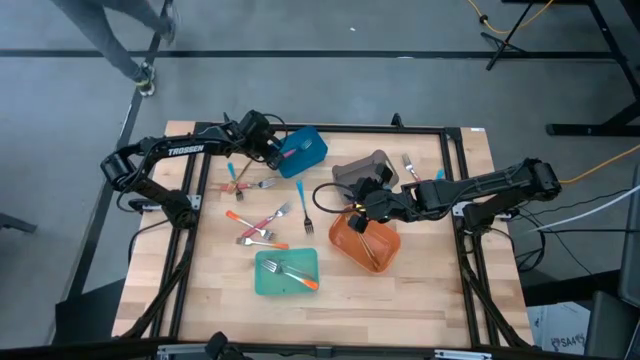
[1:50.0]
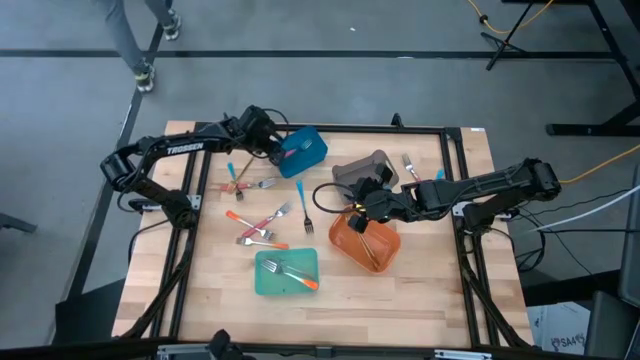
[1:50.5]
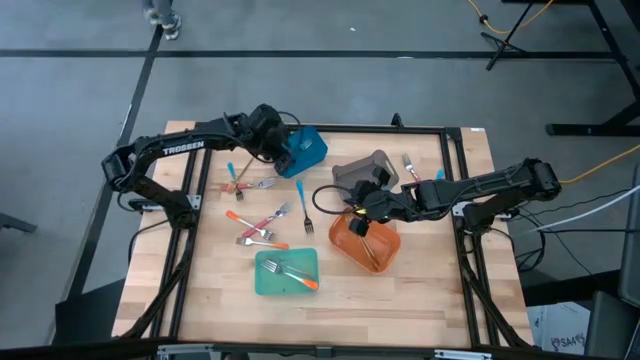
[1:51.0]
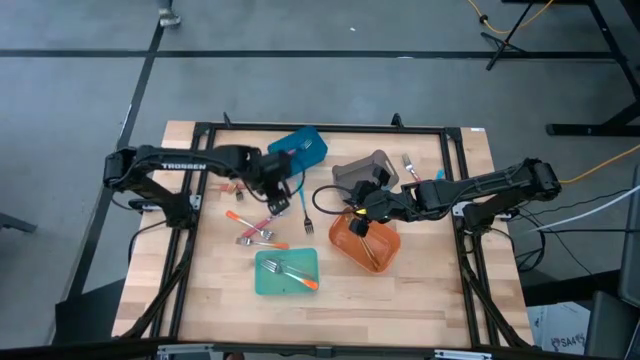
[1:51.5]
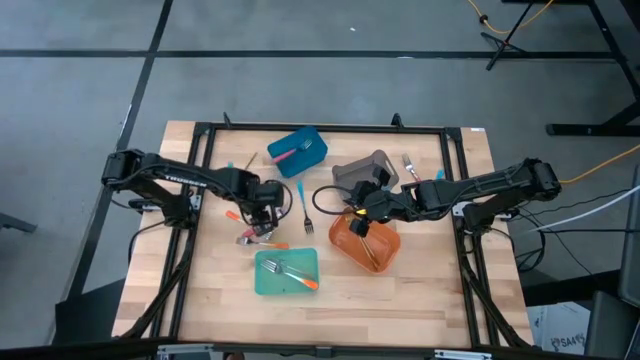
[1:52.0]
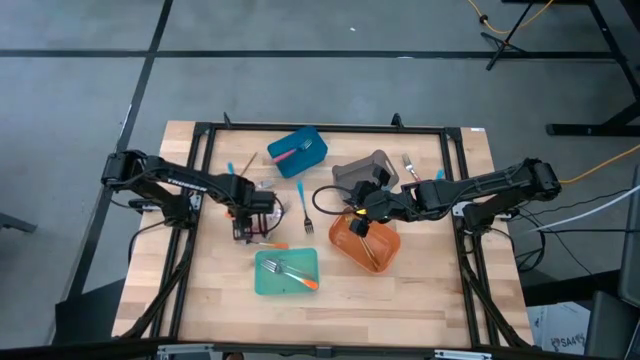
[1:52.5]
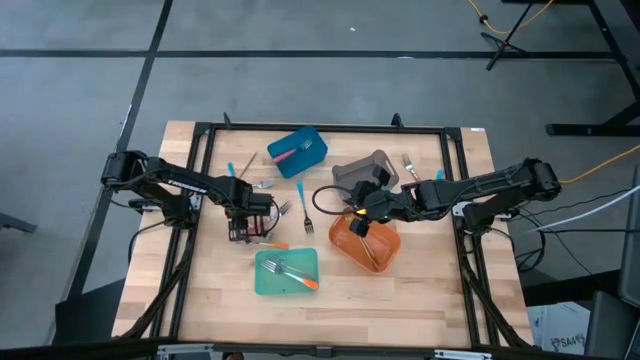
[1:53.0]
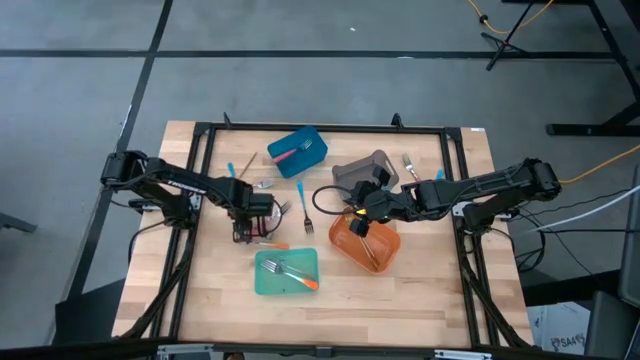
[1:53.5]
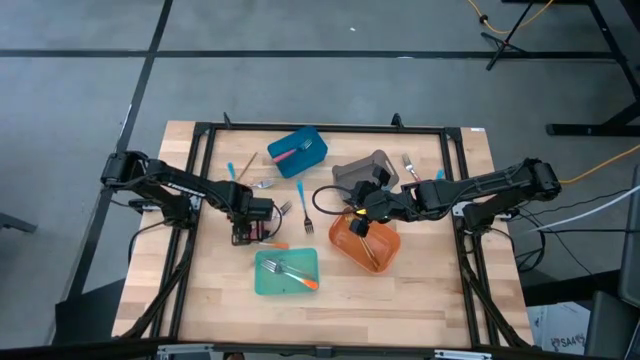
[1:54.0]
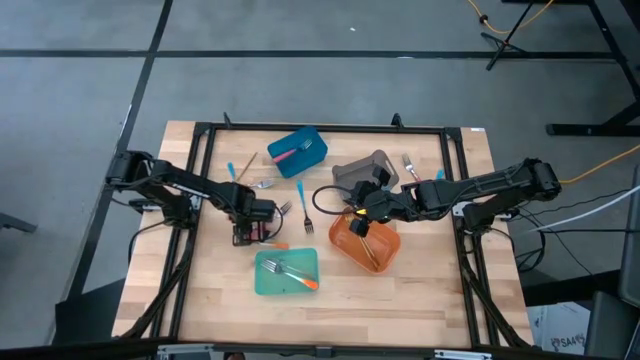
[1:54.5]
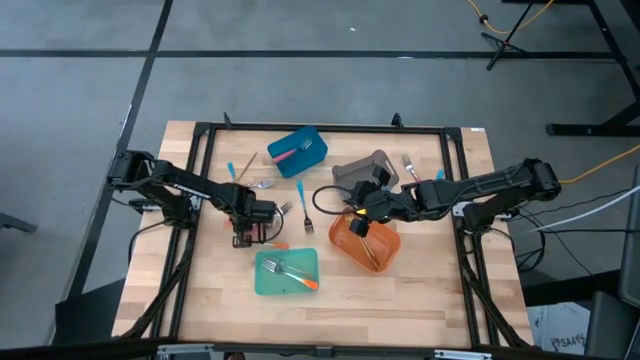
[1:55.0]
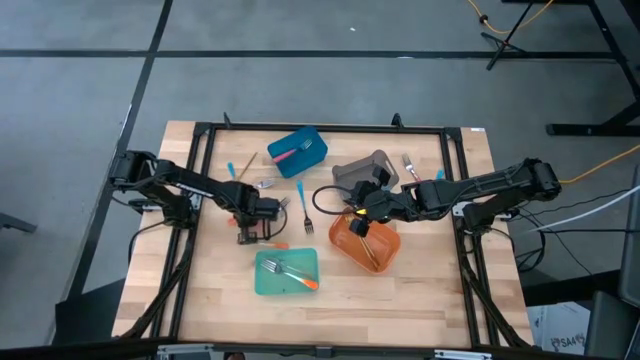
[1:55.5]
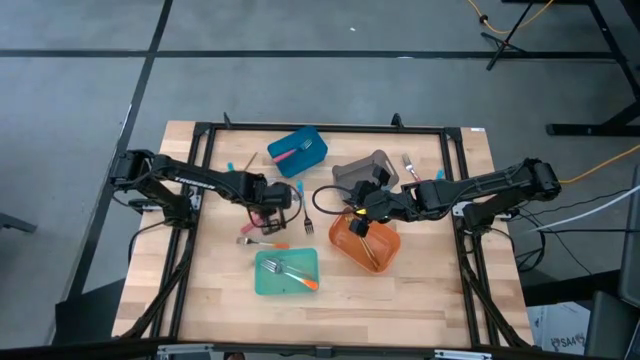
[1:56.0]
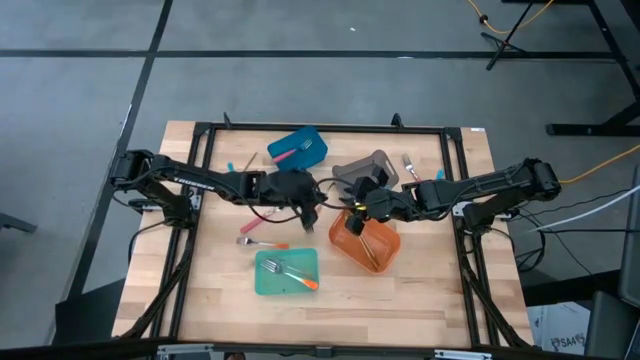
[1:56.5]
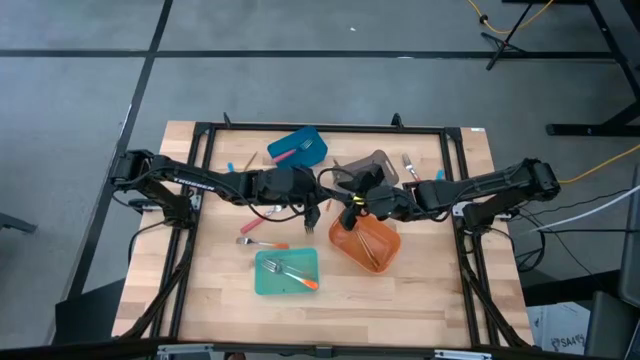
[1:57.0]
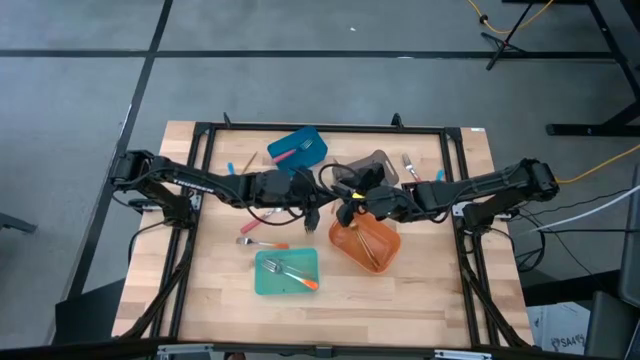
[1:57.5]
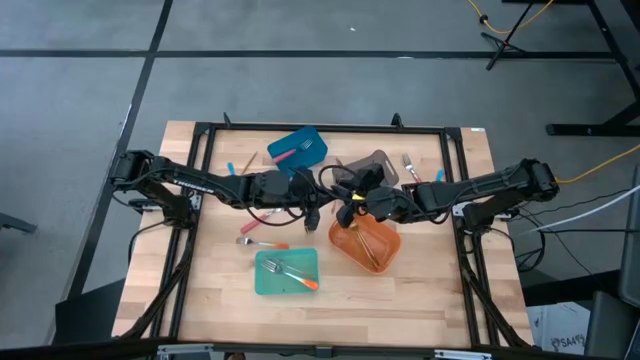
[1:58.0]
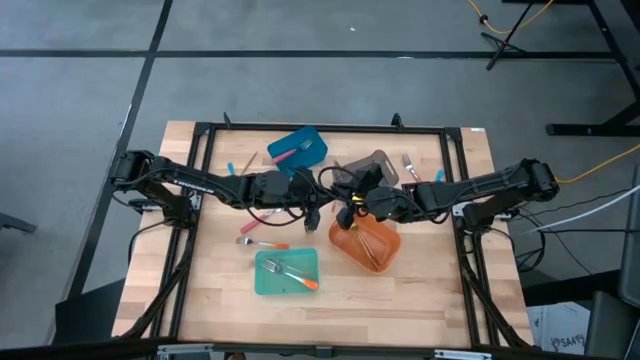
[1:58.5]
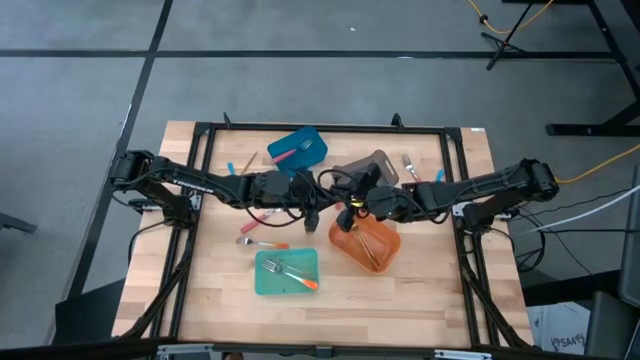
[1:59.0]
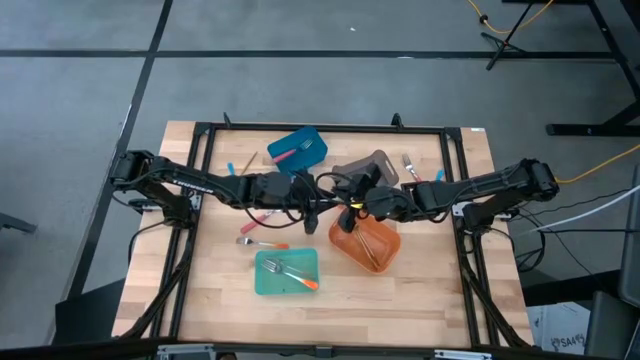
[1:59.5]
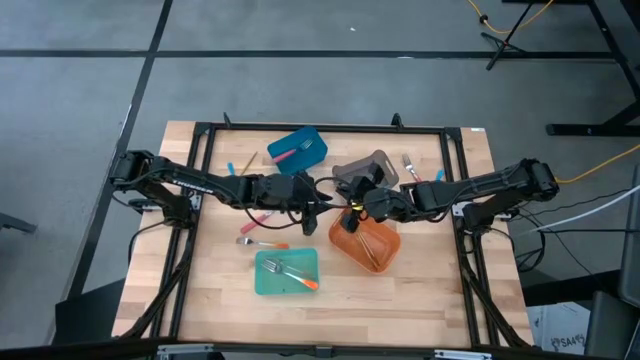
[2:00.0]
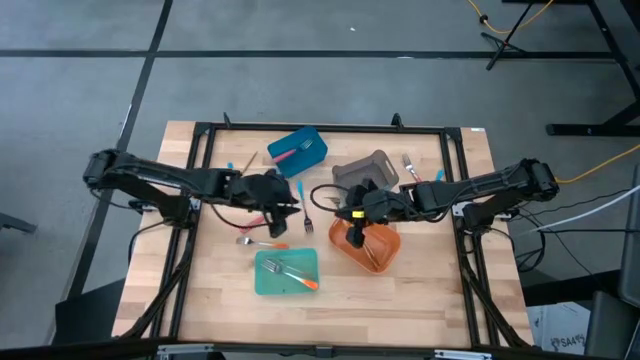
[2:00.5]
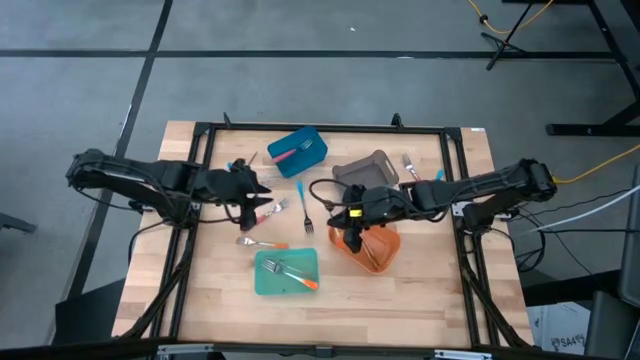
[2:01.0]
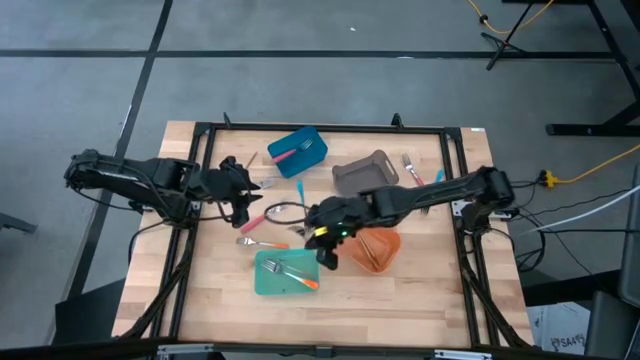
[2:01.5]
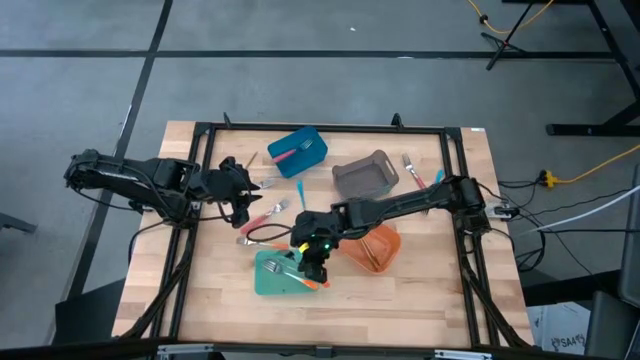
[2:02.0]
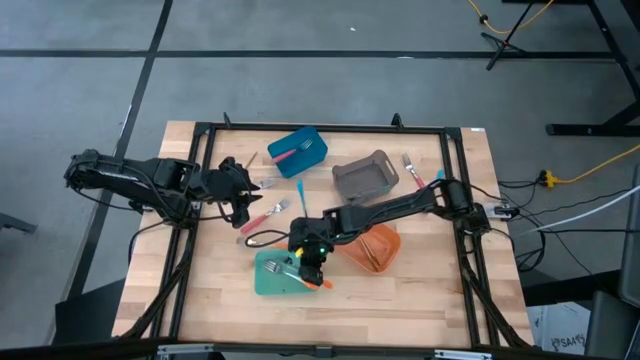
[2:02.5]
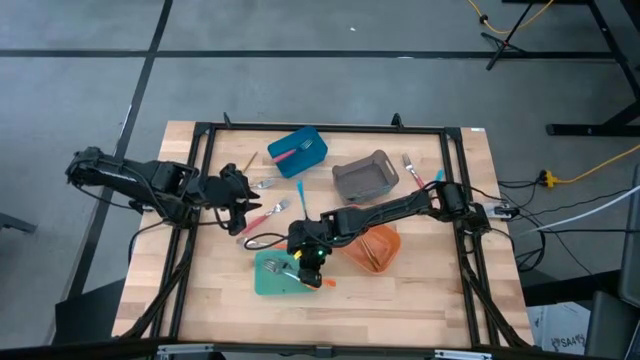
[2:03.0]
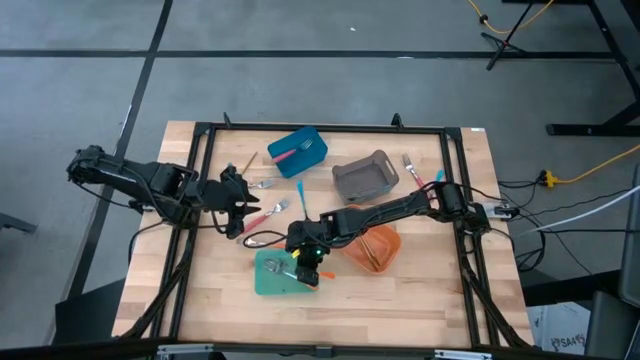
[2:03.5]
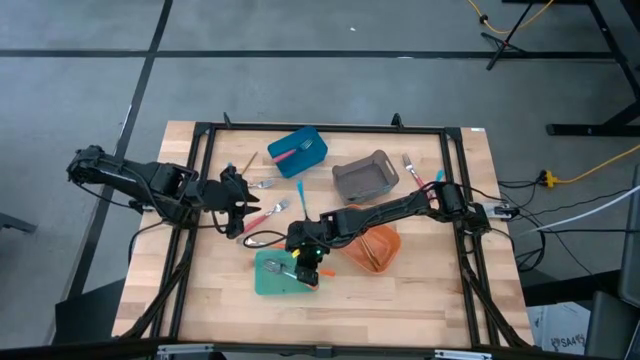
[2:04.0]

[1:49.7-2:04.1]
Task: Sort silverware by color (type)
Put the orange fork into the green bin

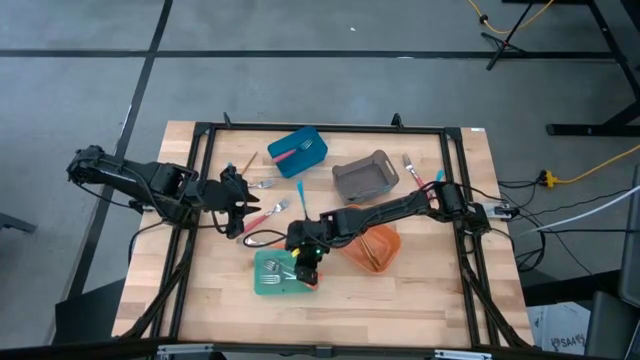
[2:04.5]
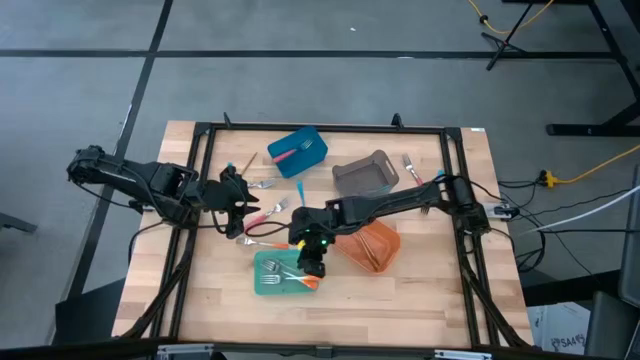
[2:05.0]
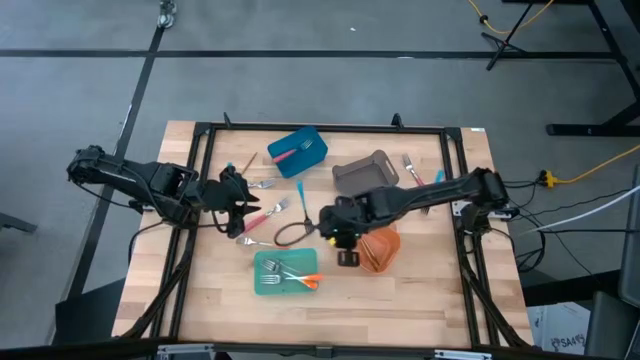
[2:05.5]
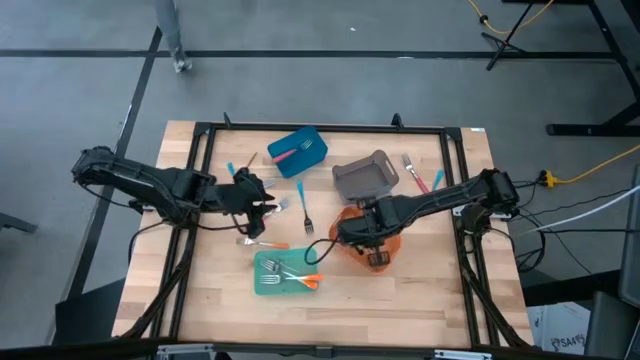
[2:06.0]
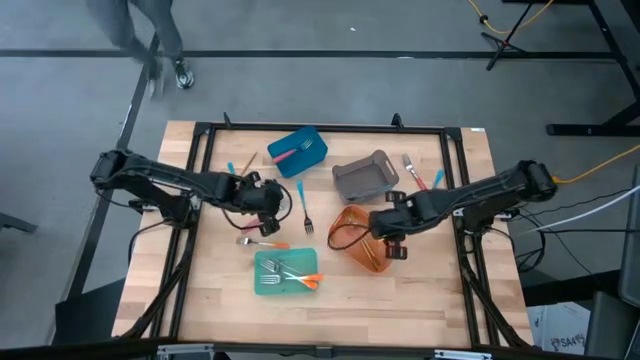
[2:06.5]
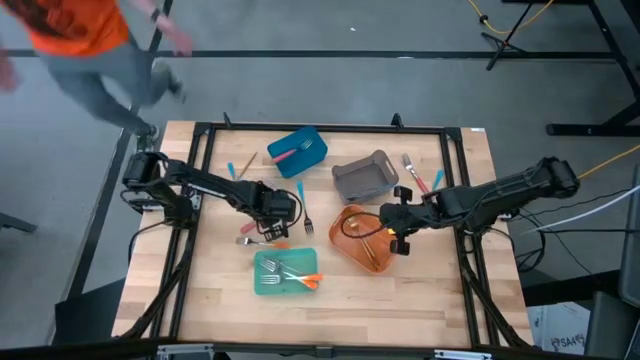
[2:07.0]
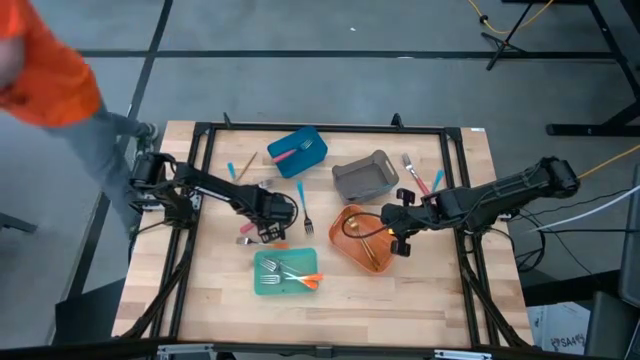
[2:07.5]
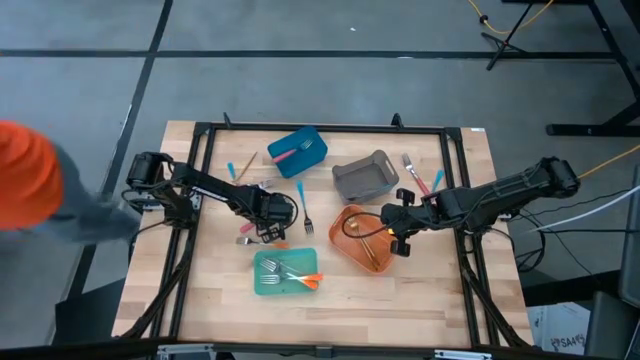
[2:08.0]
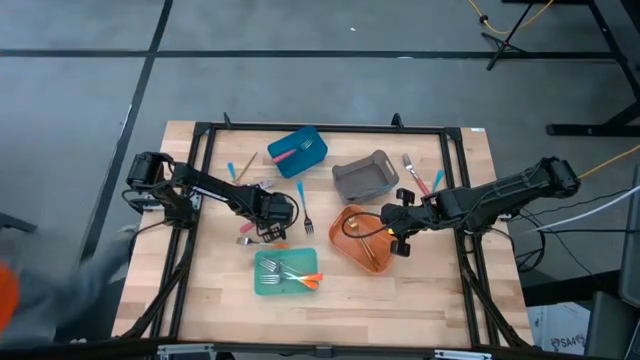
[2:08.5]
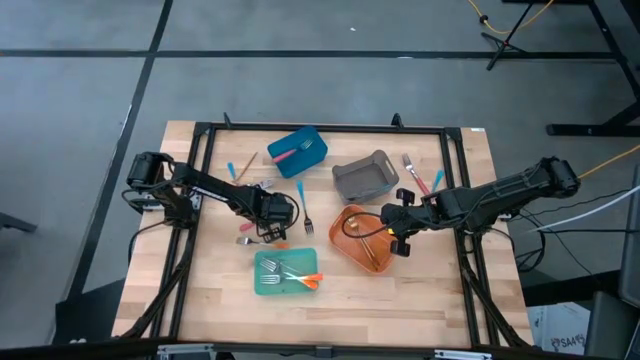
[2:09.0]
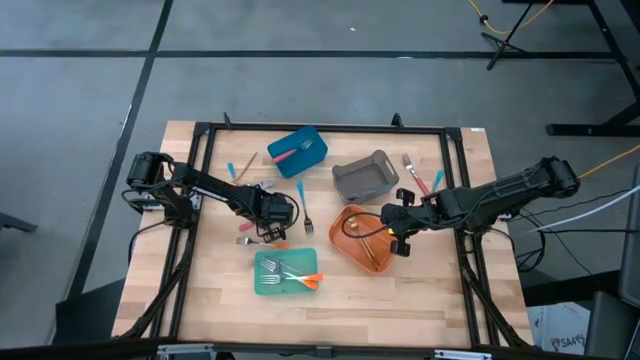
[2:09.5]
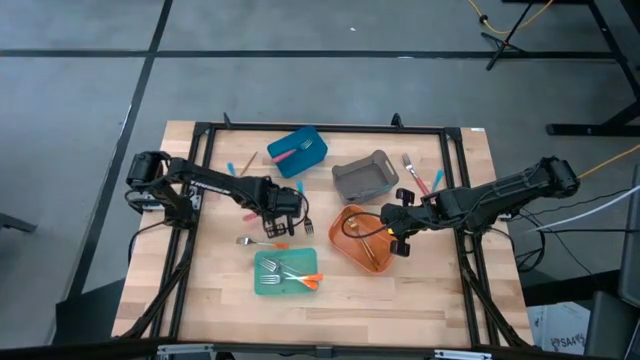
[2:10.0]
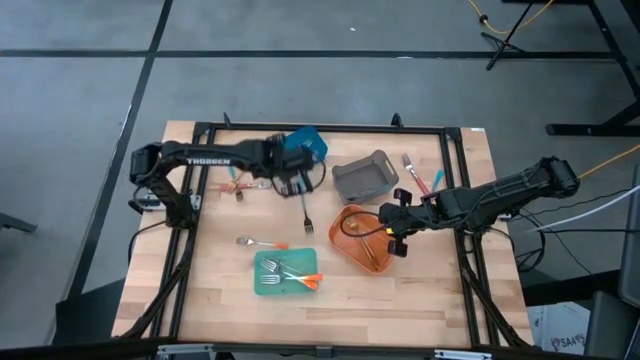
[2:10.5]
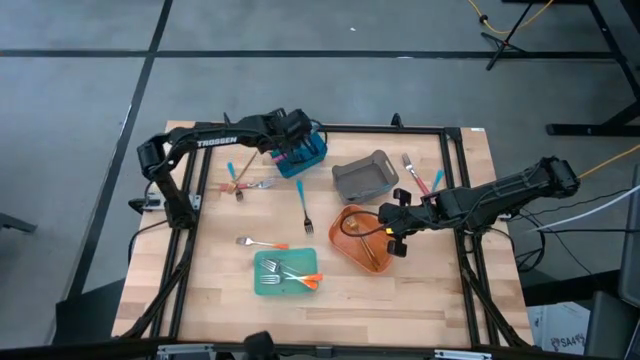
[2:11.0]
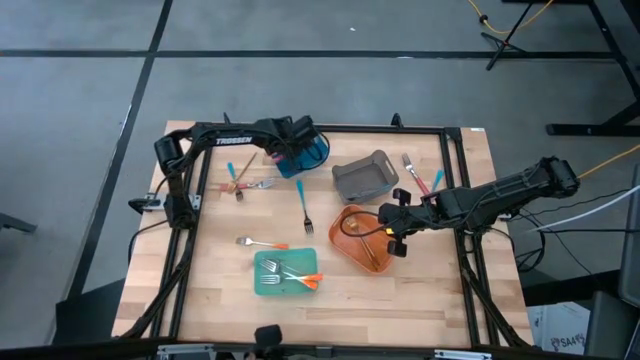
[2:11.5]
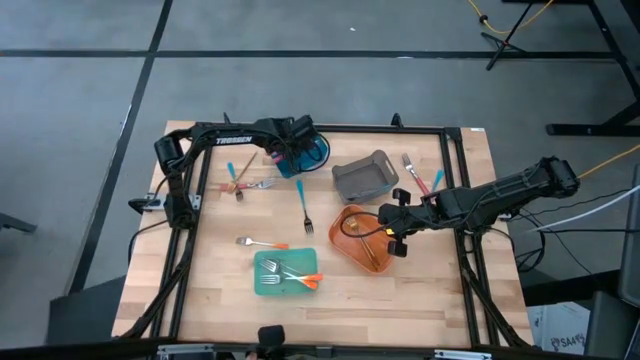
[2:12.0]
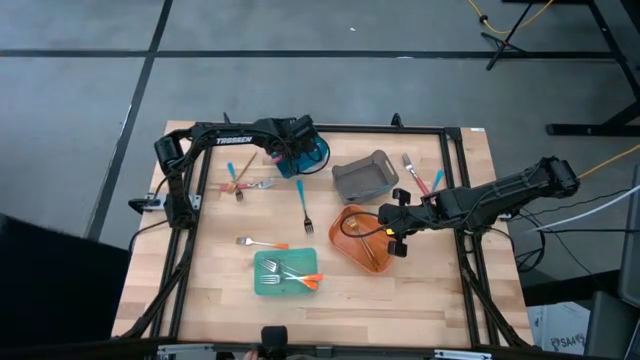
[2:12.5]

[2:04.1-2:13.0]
Put the pink fork into the blue bin
